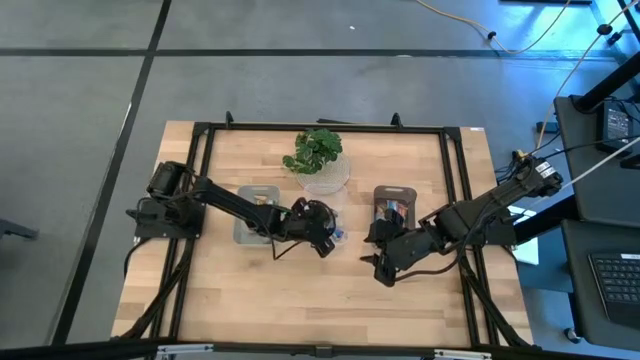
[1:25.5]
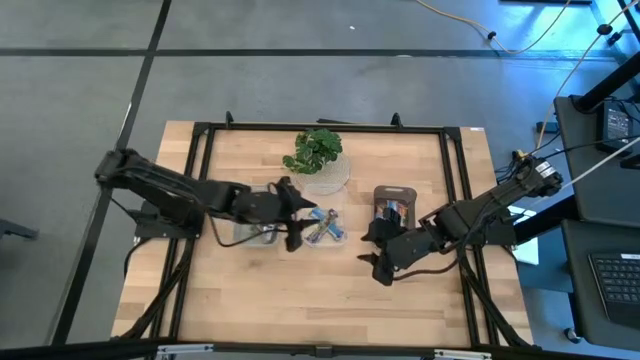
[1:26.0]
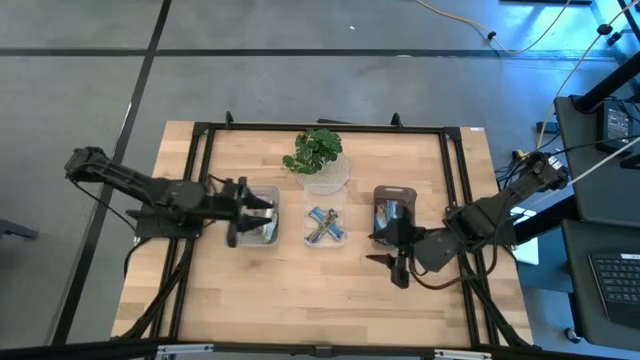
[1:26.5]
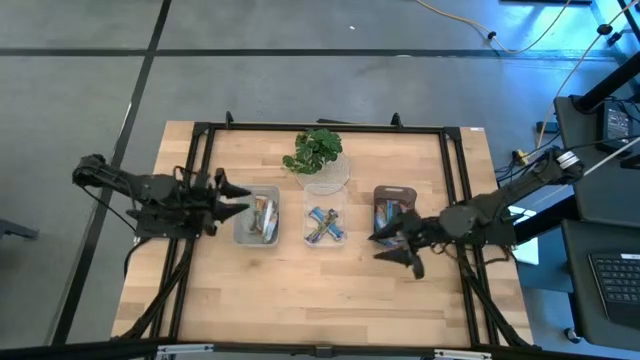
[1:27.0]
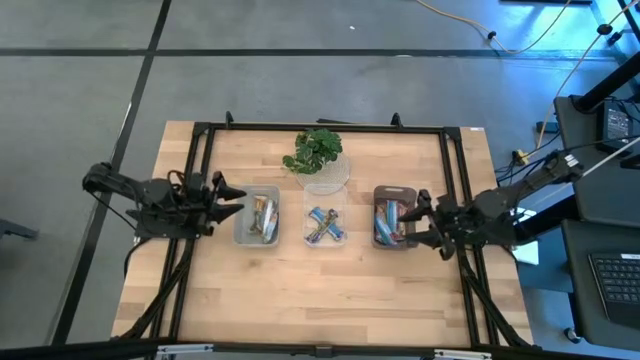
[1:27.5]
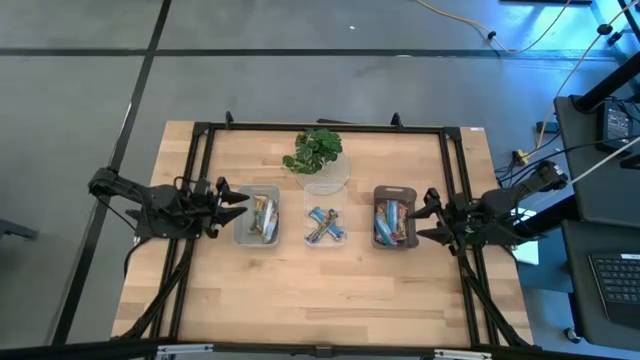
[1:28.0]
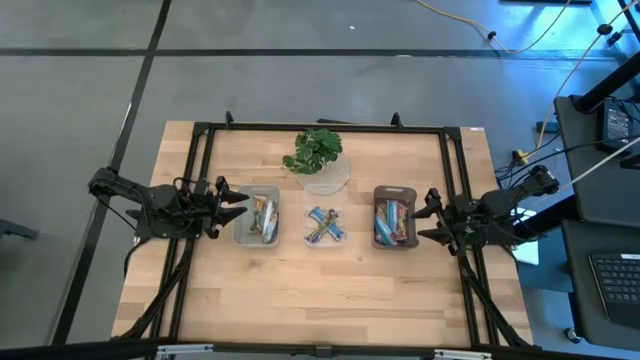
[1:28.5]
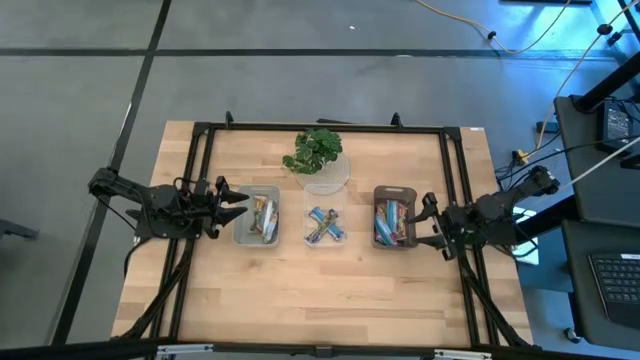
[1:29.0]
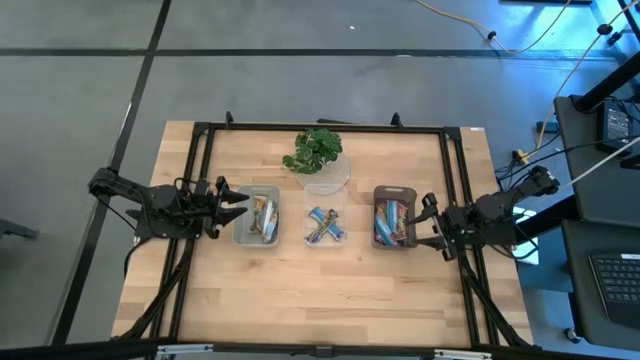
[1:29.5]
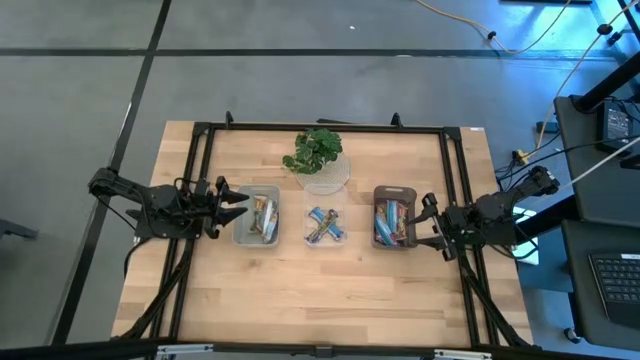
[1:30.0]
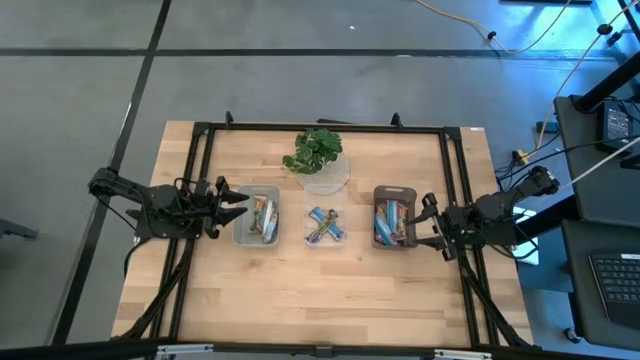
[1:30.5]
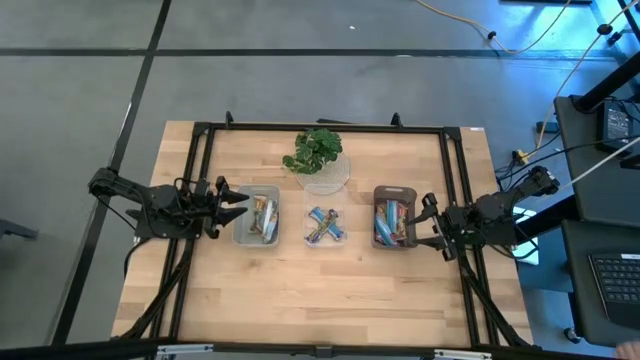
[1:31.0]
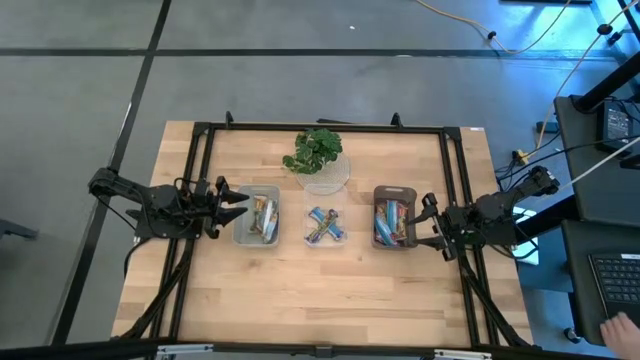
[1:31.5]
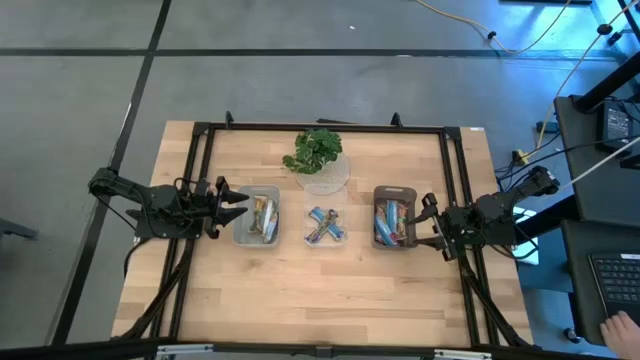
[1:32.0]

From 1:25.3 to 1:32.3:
Task: Pick and place Granola Bars by type
Return to Home Position

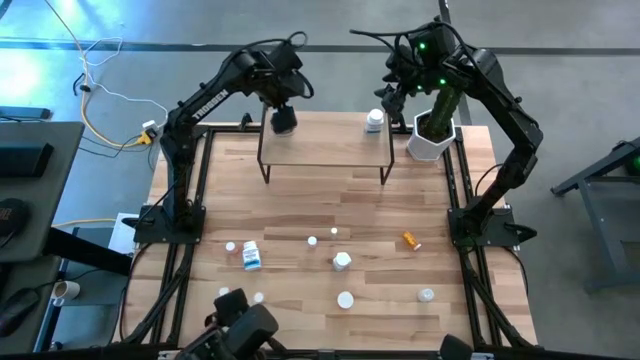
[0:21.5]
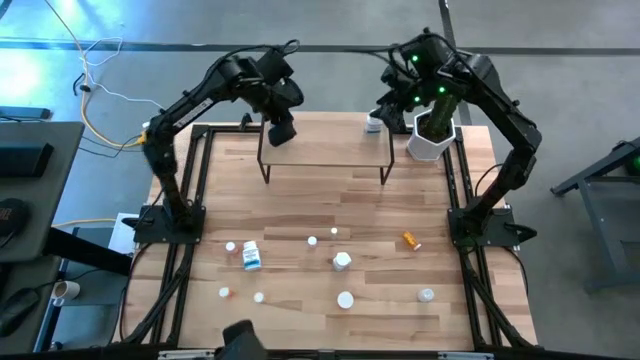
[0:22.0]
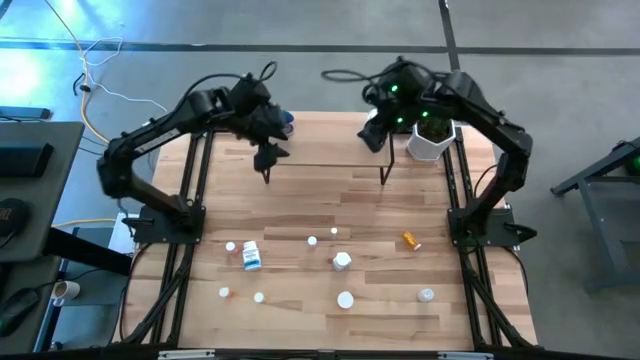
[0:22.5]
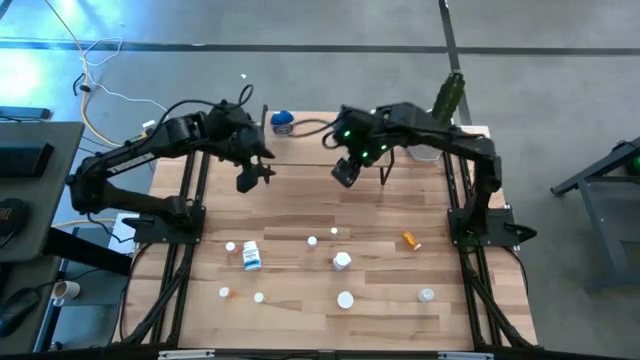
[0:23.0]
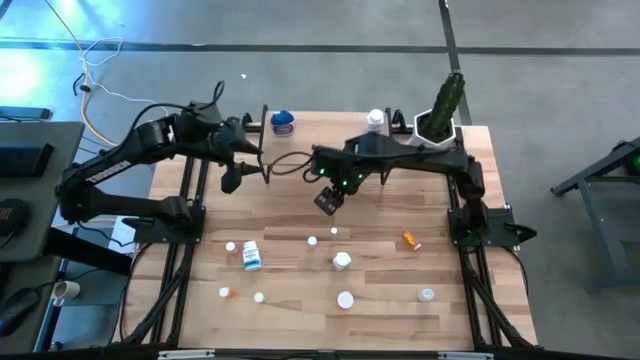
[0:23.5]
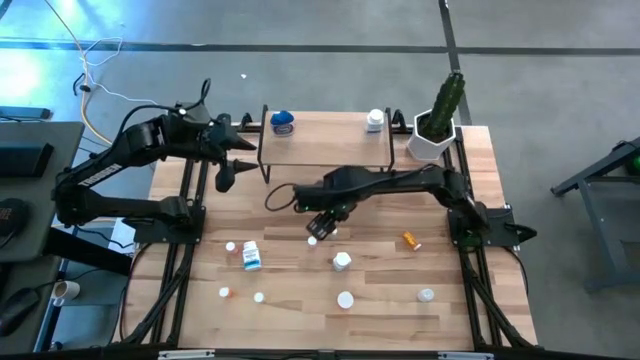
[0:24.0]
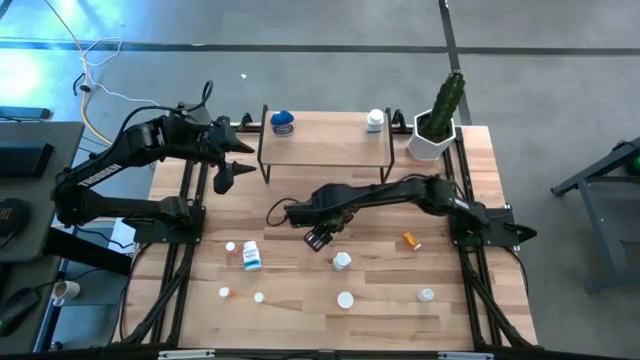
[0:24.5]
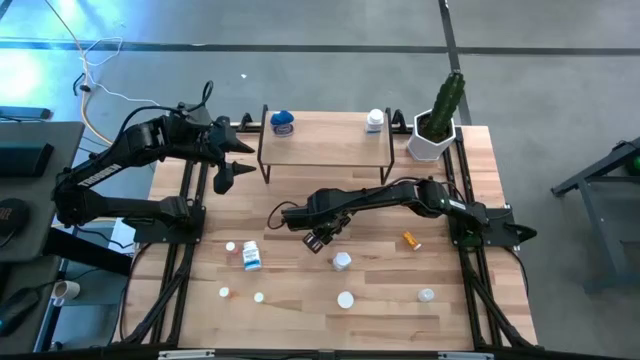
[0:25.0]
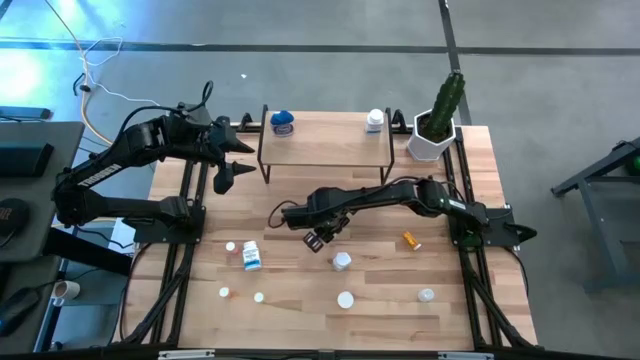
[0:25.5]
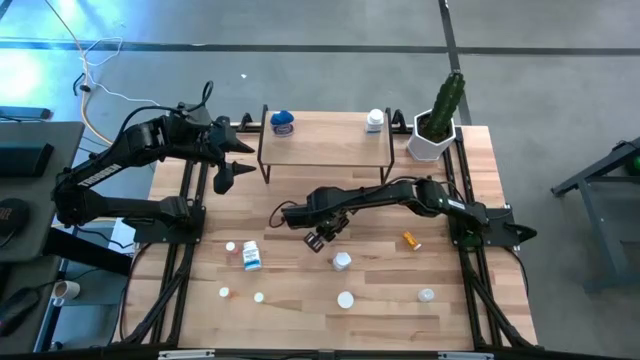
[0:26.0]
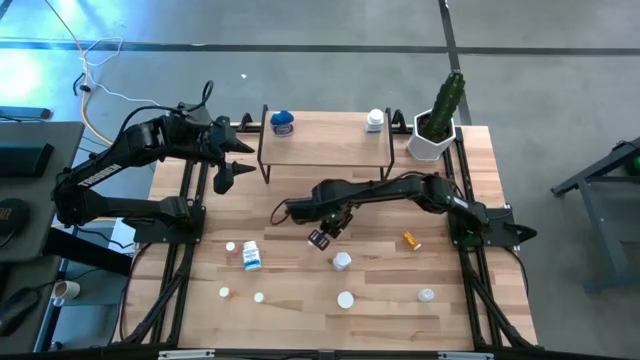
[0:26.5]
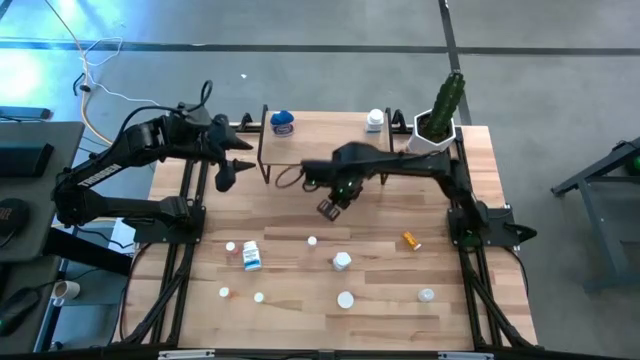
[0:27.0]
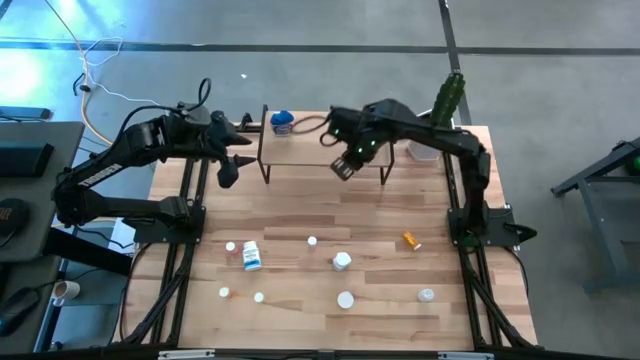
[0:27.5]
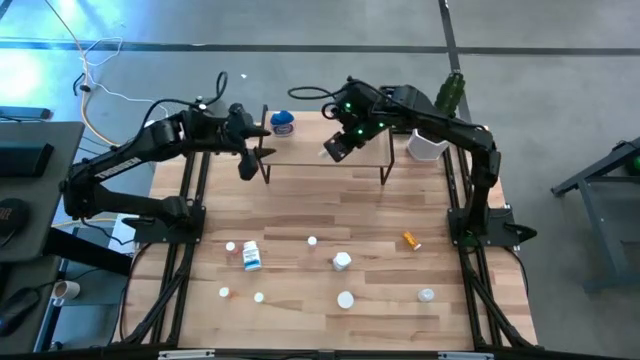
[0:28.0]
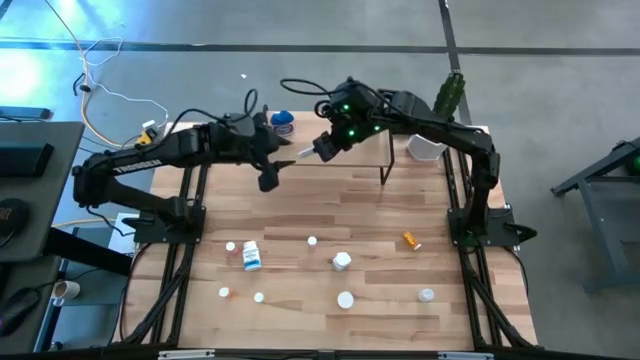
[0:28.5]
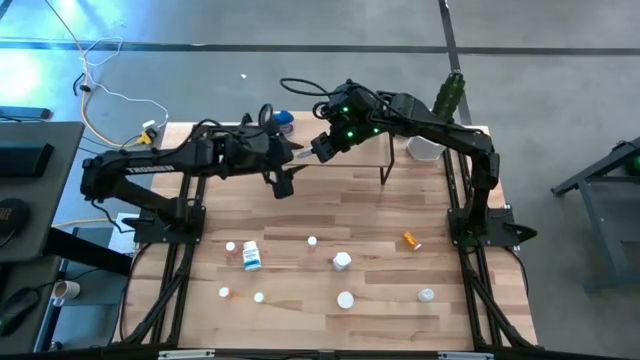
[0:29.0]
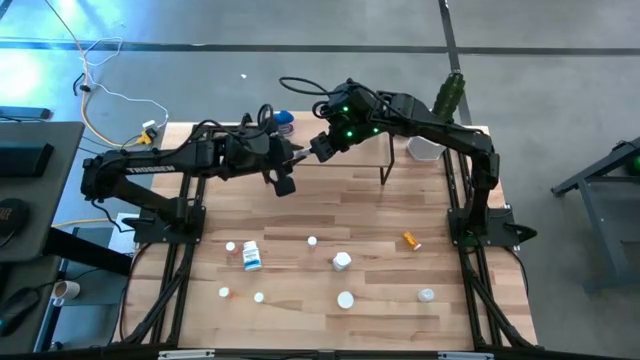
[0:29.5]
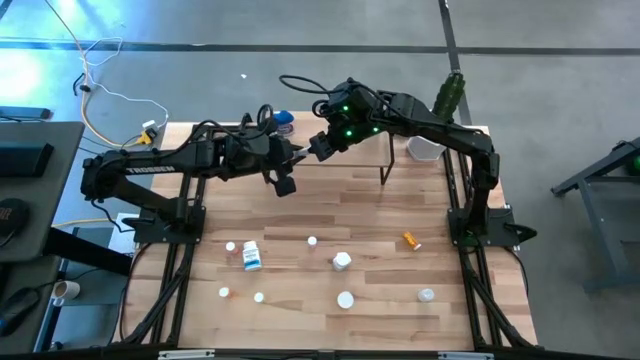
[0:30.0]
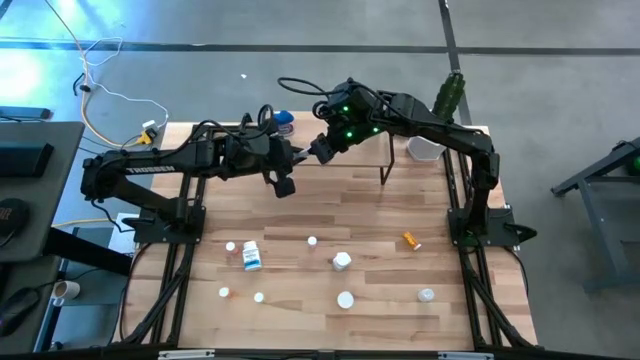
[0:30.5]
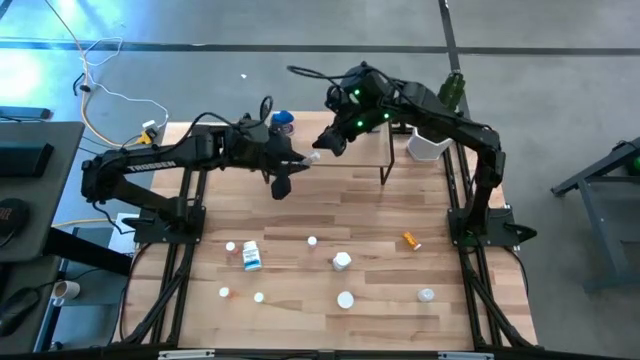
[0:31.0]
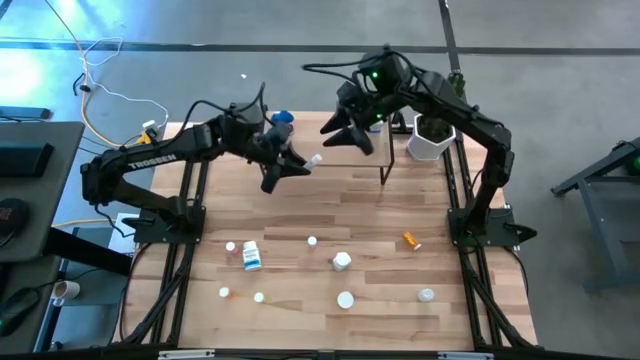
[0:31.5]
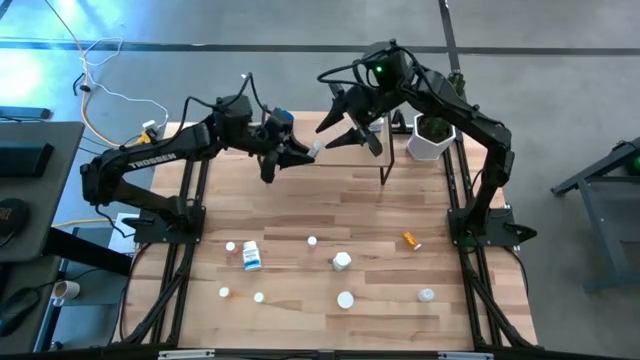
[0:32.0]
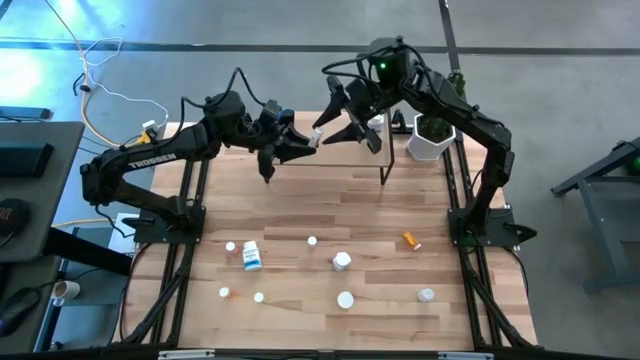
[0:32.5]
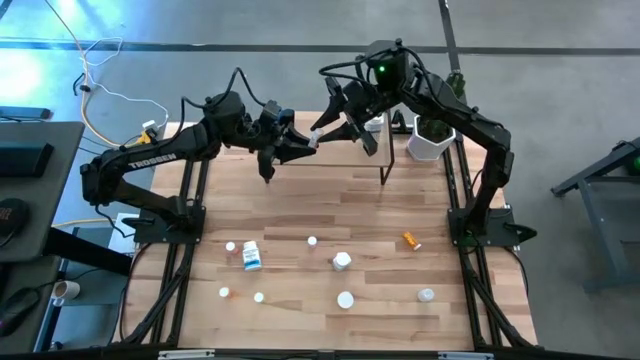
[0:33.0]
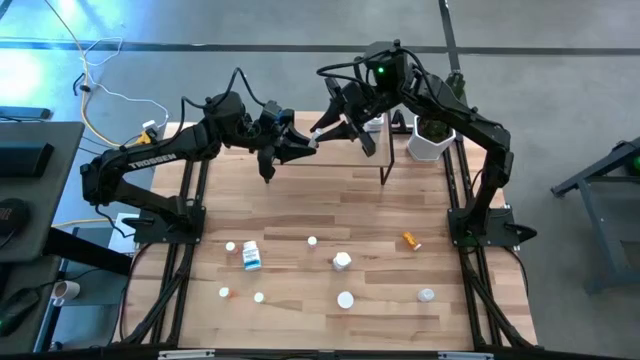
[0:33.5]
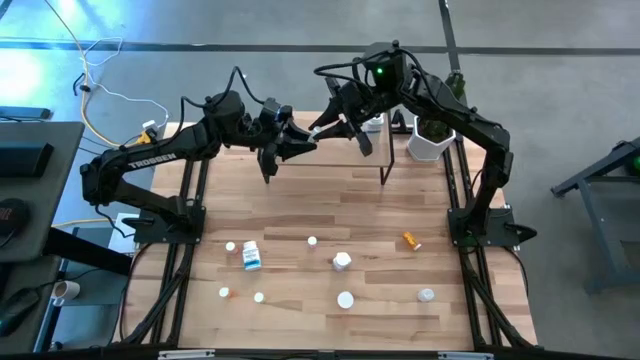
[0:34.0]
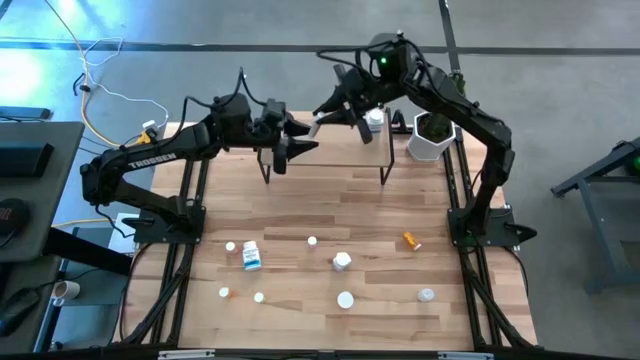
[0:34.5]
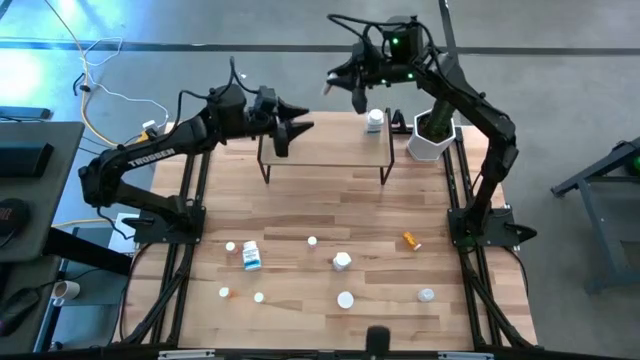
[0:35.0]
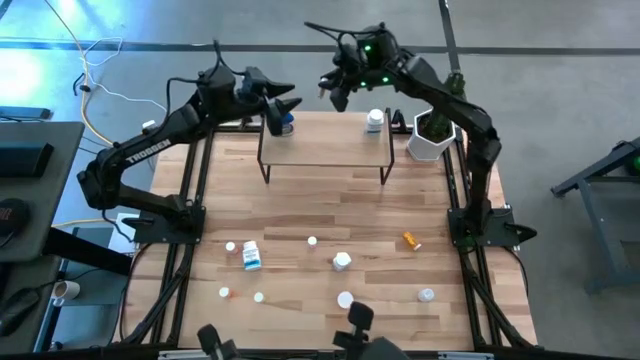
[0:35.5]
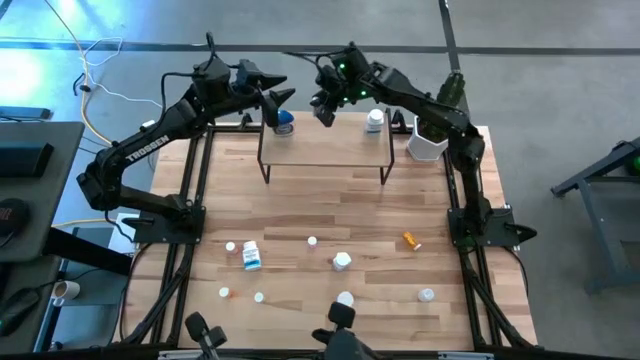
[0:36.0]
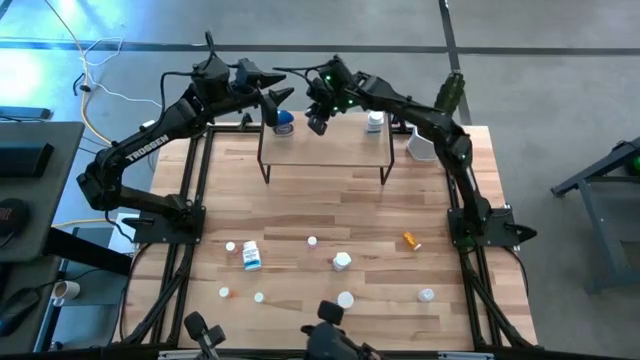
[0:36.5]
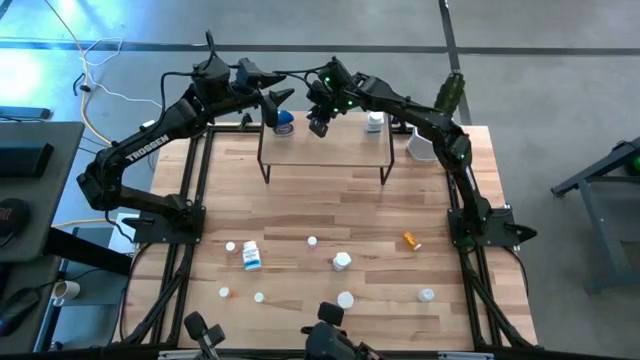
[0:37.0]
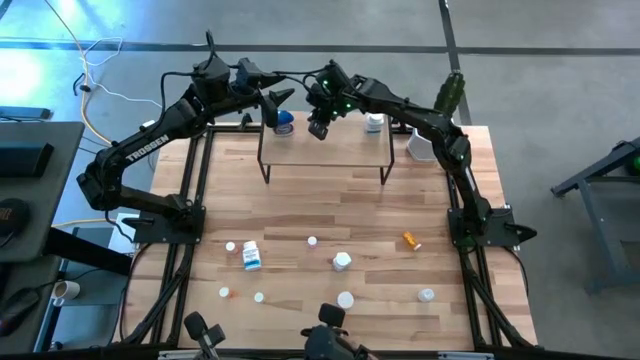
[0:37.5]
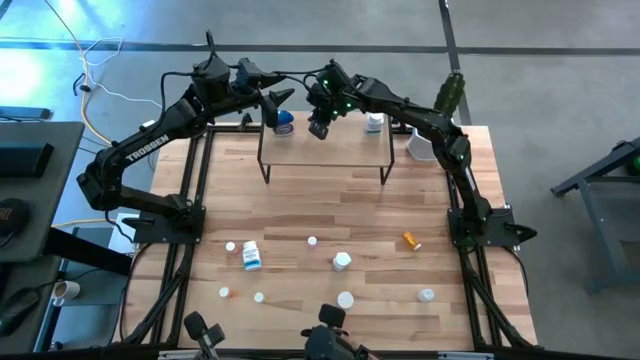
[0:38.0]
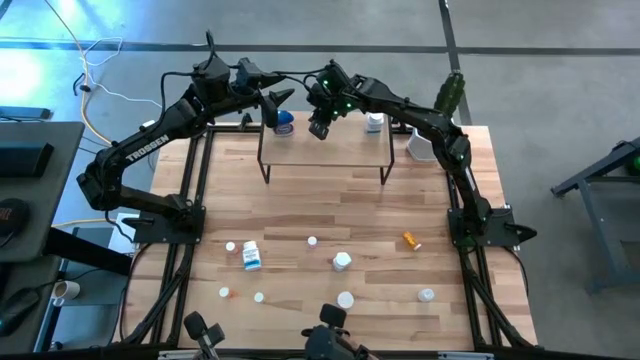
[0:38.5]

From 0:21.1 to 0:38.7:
Task: Pick and place medicine bottles onto shelf by color
Put the yellow pill bottle on the shelf
